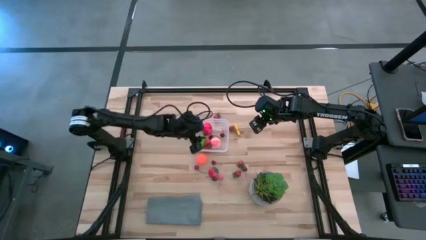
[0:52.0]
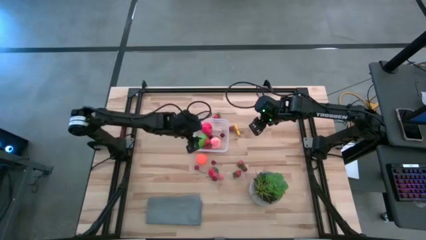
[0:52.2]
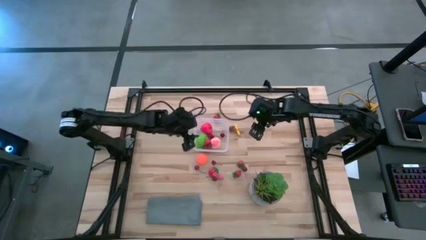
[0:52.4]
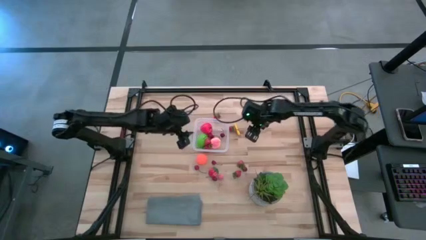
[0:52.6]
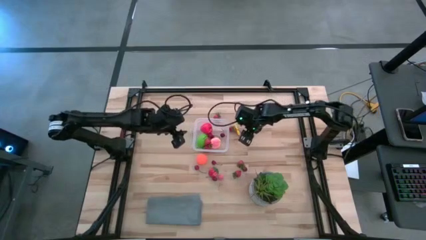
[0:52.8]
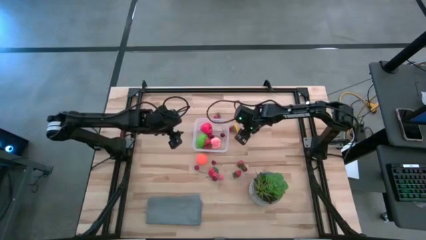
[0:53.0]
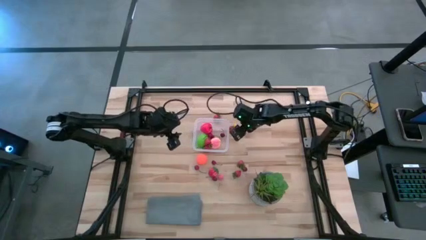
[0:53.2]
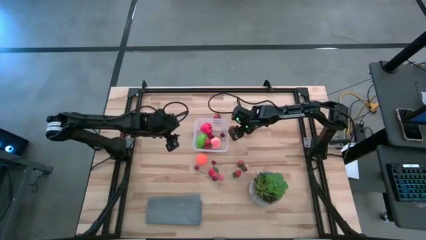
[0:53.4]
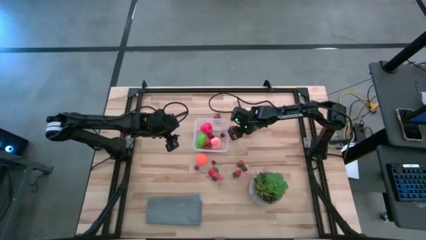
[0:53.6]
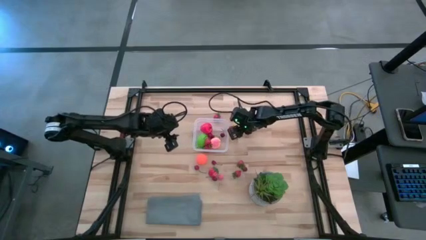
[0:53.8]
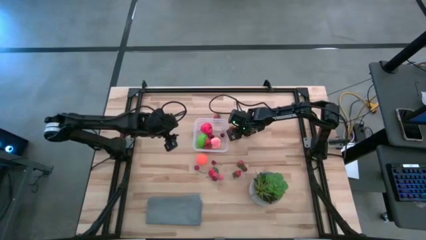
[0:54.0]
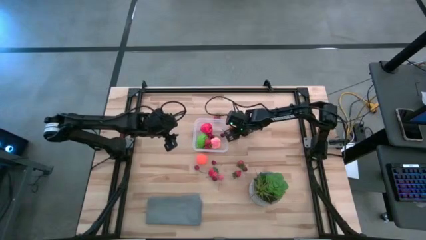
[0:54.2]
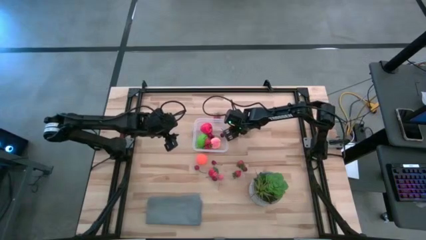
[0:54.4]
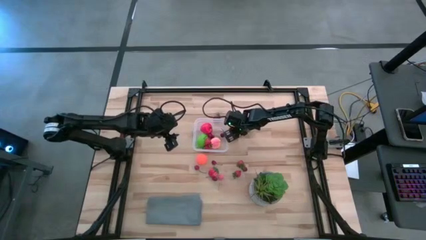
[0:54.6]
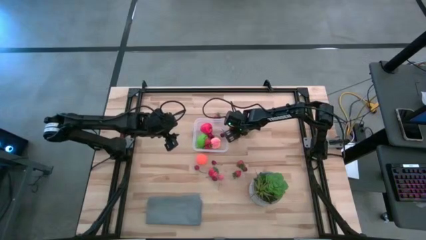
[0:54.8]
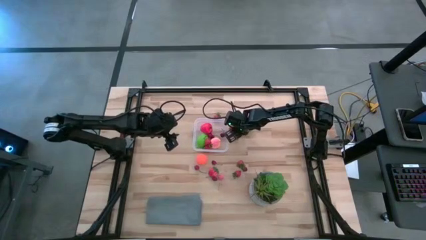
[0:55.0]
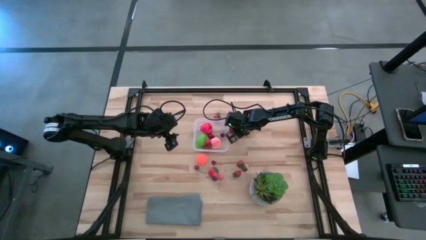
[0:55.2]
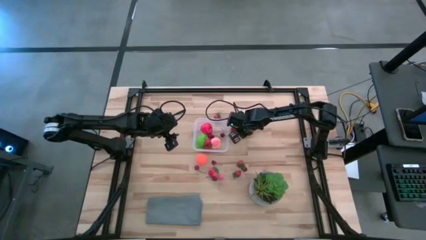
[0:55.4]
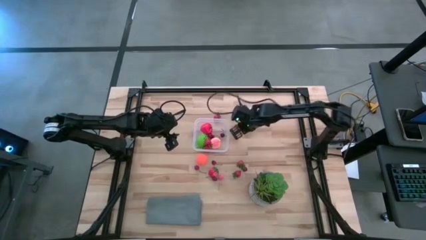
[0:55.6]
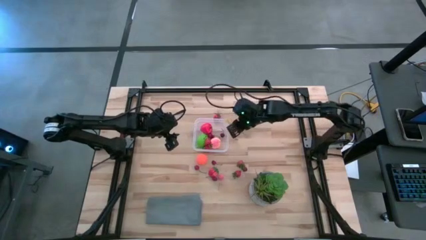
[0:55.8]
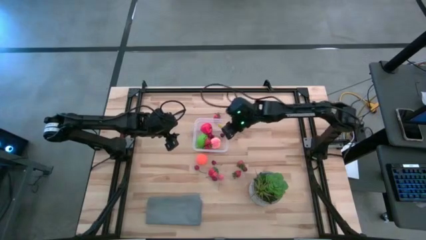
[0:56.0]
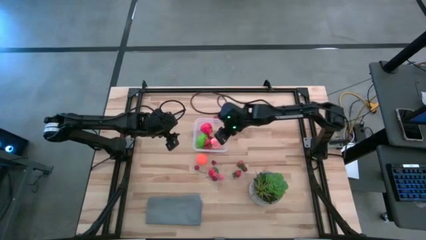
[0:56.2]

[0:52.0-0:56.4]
Task: Pick and placing Produce into tupperware
Put the yellow corn into the transparent bin

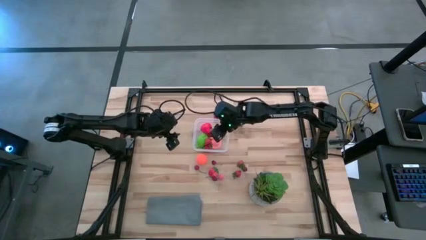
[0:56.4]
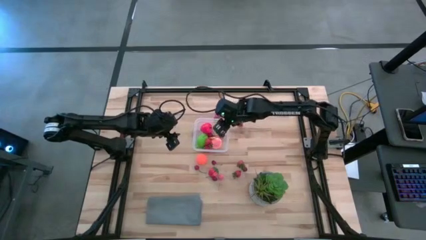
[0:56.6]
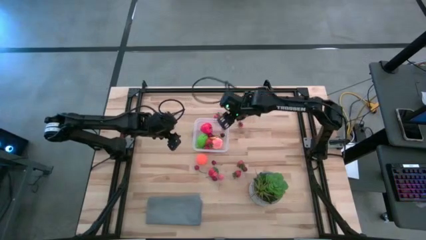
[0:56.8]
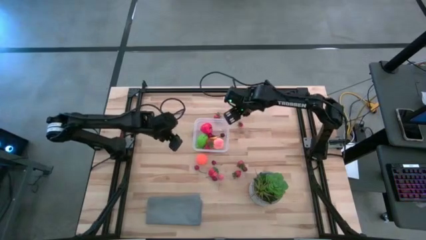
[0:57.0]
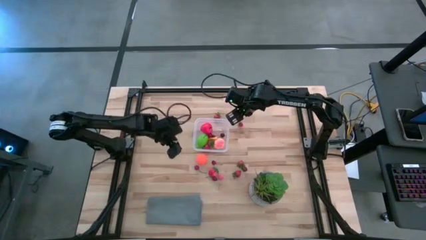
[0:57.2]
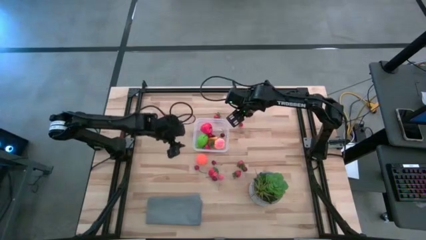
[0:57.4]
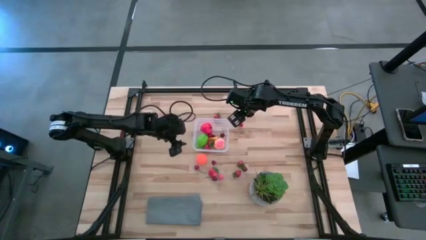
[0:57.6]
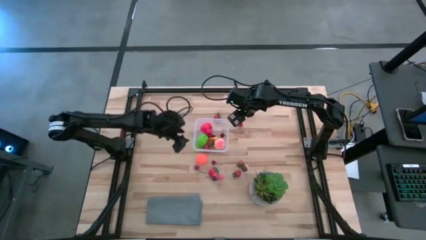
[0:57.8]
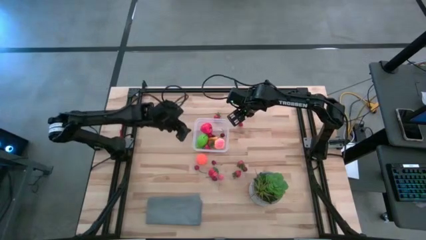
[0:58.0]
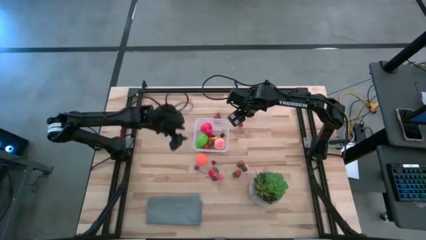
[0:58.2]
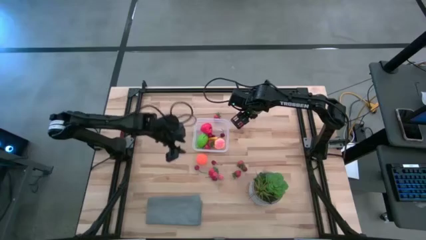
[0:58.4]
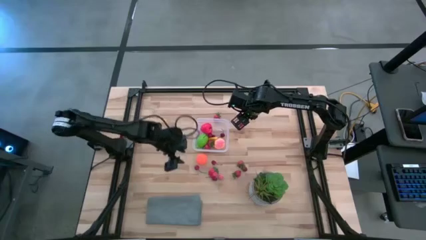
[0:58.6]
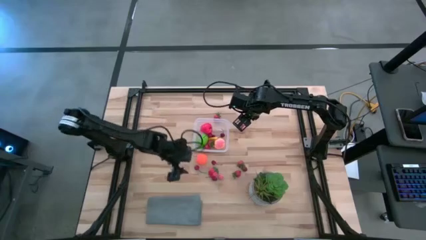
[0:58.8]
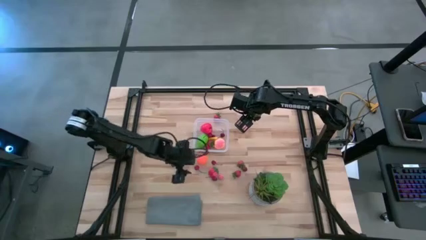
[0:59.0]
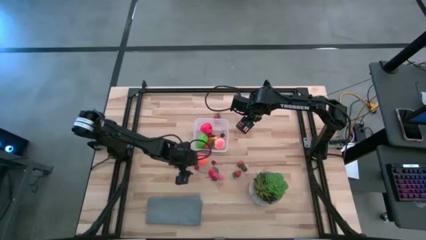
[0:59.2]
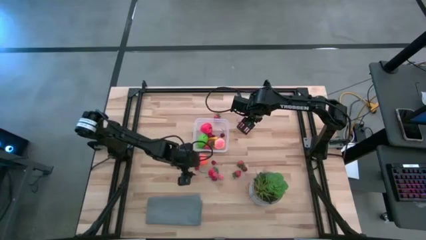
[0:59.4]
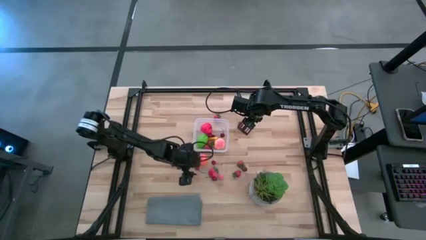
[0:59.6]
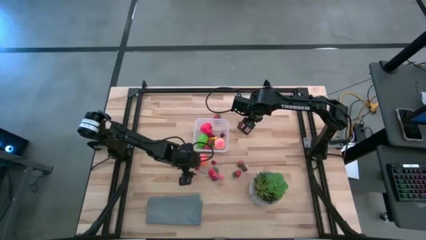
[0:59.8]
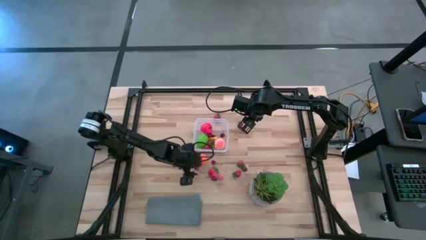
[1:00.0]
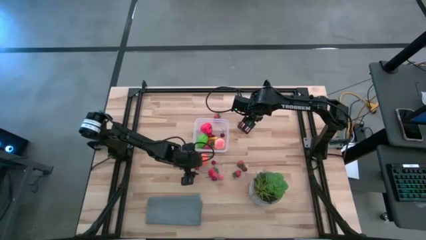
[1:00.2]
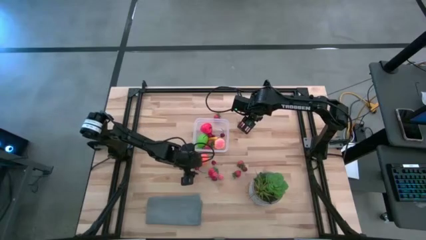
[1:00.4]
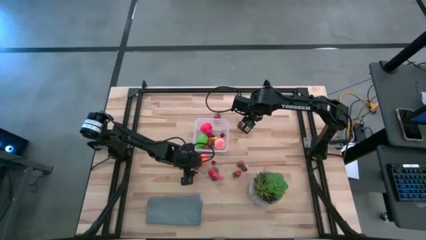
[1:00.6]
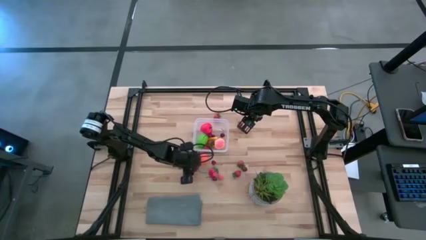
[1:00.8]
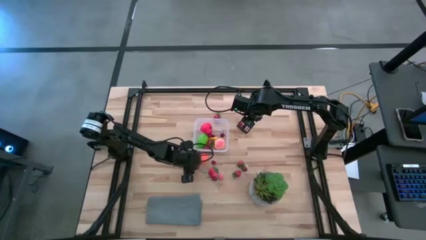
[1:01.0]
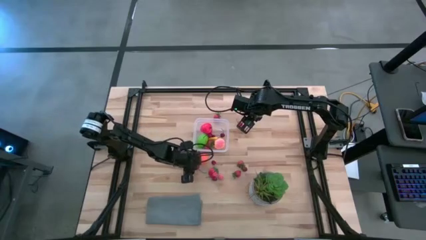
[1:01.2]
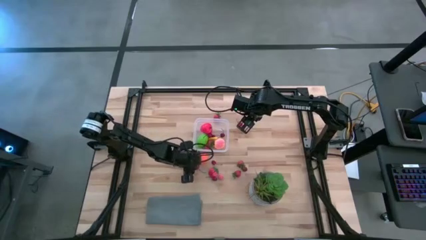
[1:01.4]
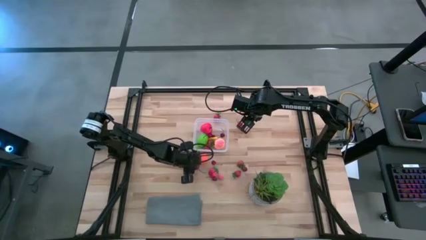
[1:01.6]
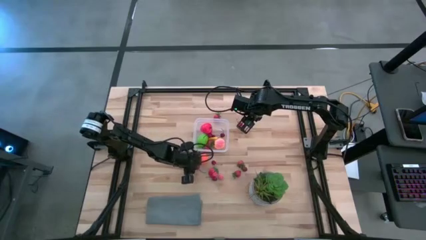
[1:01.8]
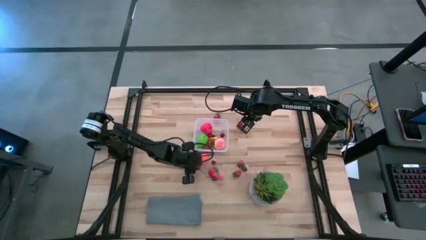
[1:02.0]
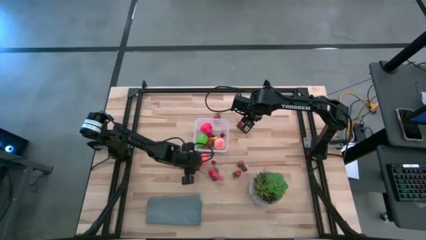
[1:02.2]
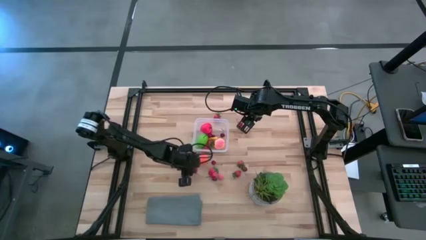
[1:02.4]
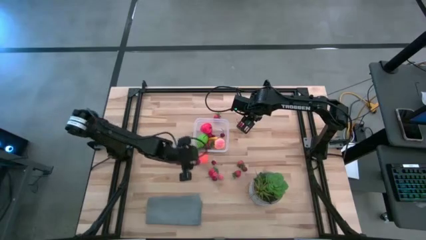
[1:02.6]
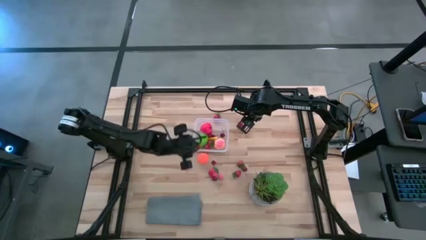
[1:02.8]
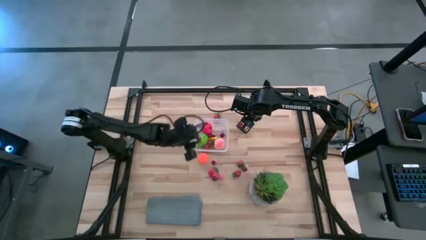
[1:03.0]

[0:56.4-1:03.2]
Put the red cherry into the transparent bin

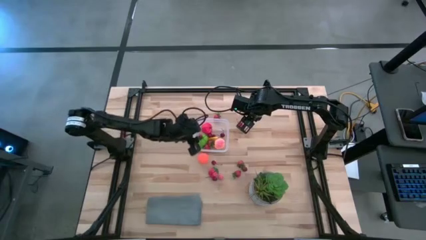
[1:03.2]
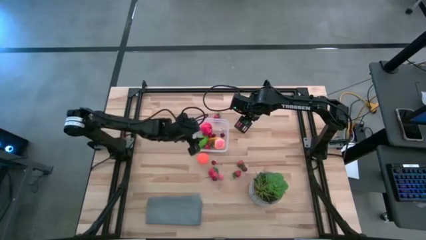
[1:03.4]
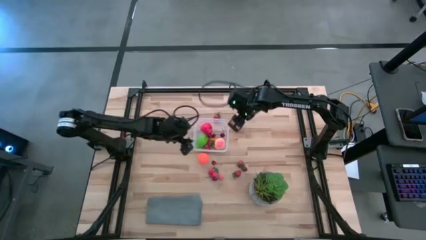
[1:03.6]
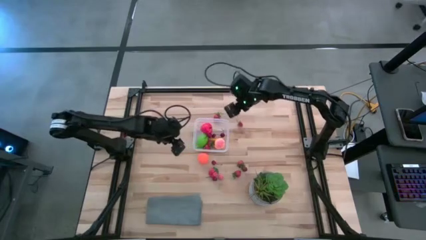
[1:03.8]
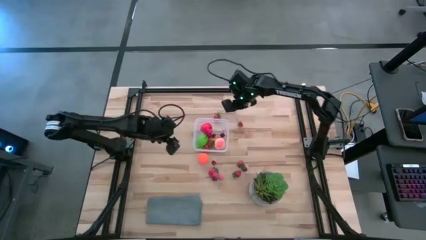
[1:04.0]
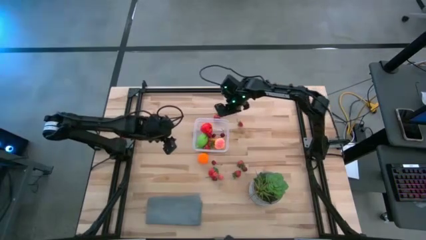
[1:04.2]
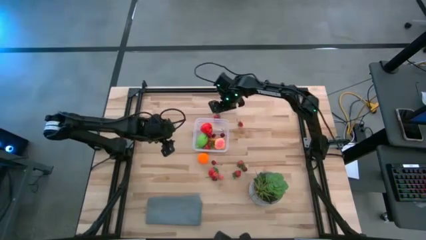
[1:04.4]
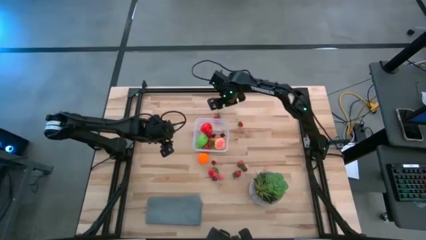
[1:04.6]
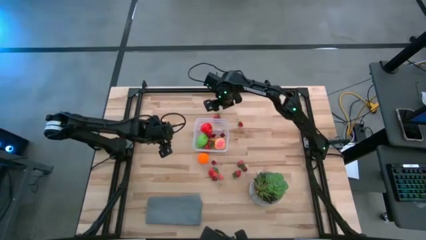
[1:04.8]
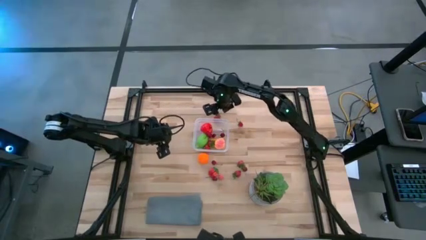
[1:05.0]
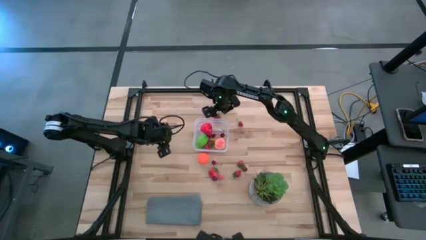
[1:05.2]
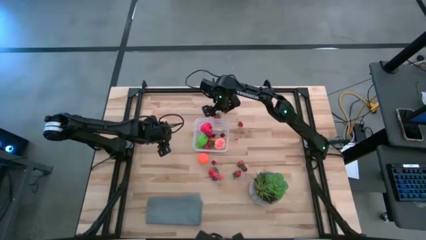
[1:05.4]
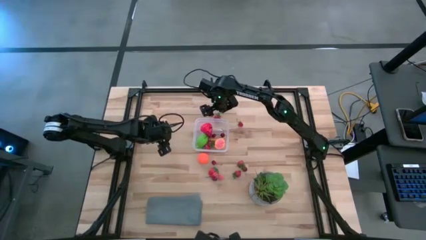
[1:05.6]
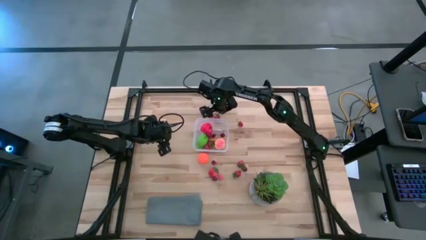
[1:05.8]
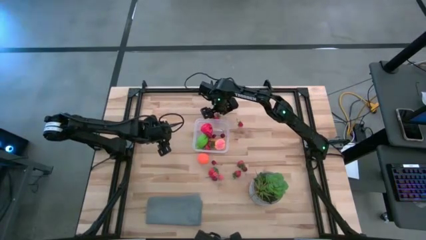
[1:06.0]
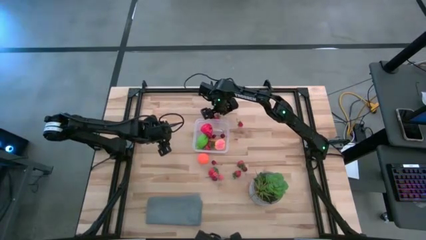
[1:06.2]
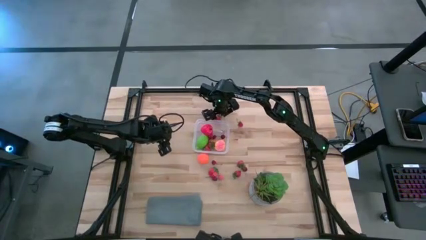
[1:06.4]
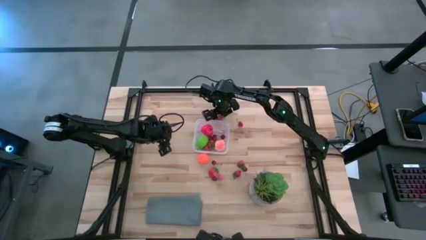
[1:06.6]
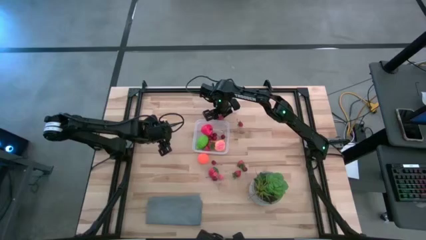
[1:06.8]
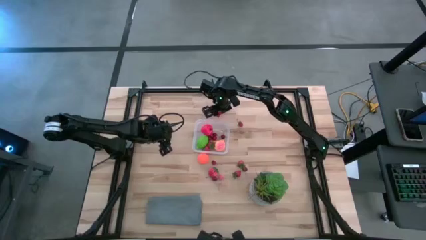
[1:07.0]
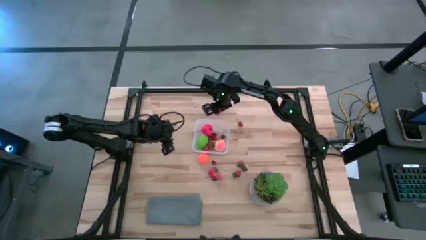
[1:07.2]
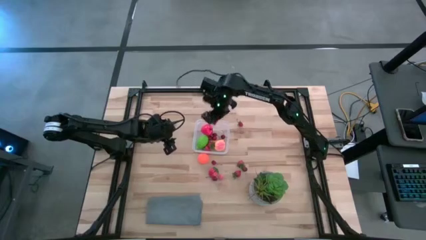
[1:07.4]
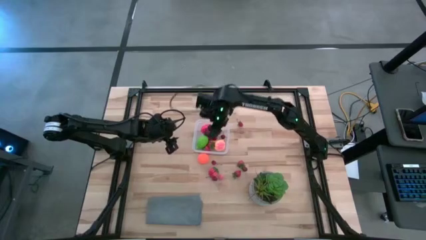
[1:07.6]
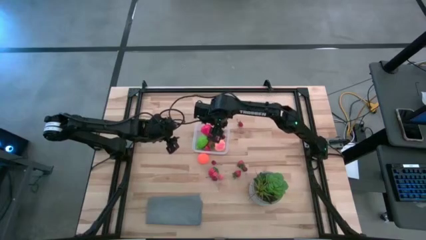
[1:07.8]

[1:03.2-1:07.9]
Put the red strawberry into the transparent bin

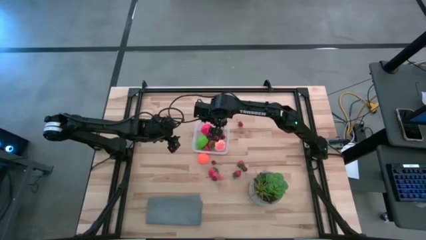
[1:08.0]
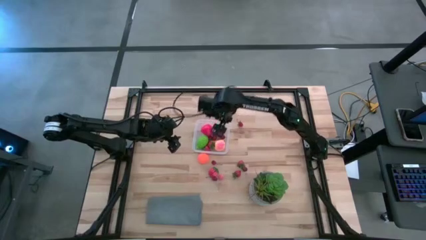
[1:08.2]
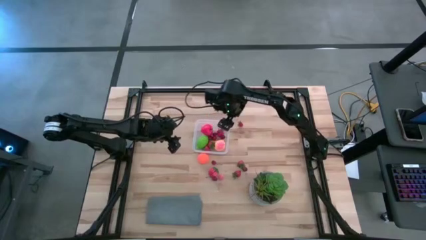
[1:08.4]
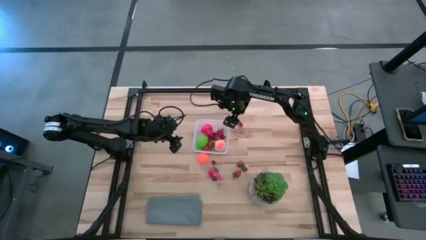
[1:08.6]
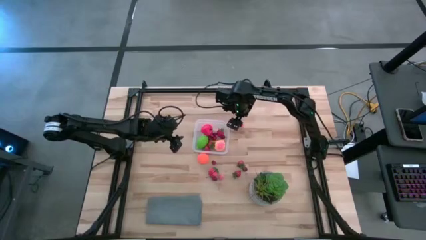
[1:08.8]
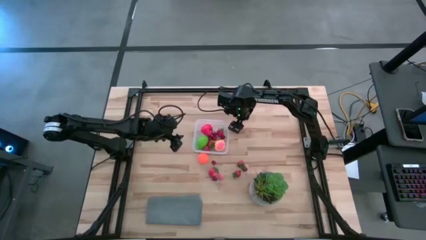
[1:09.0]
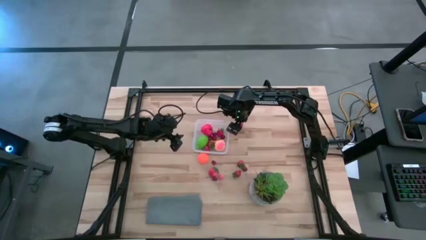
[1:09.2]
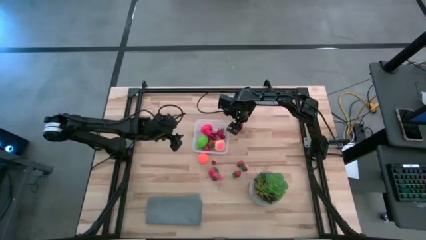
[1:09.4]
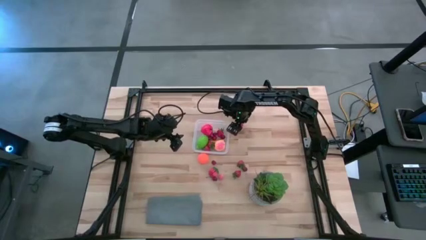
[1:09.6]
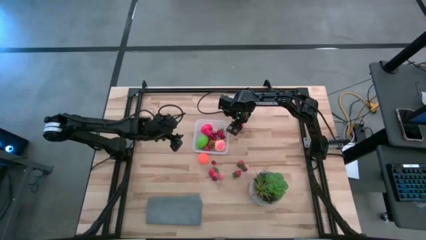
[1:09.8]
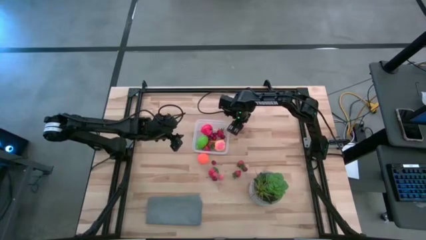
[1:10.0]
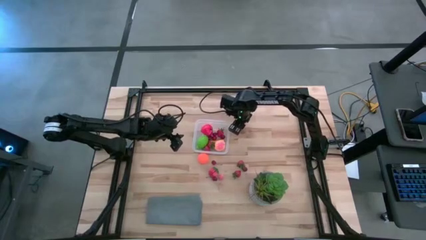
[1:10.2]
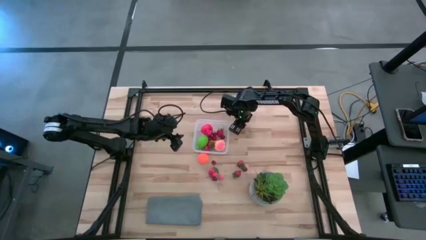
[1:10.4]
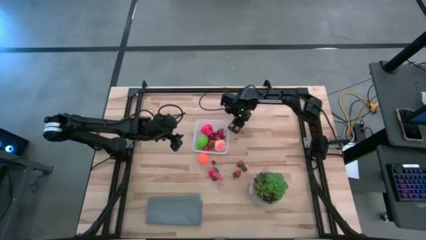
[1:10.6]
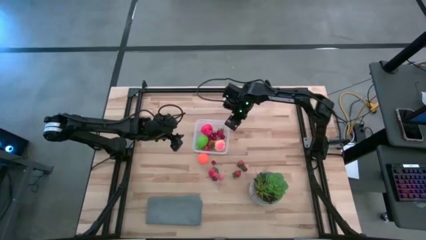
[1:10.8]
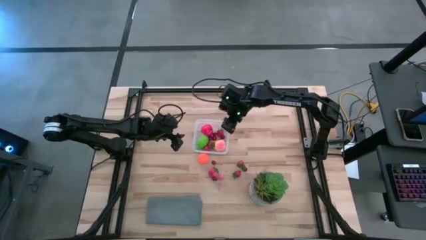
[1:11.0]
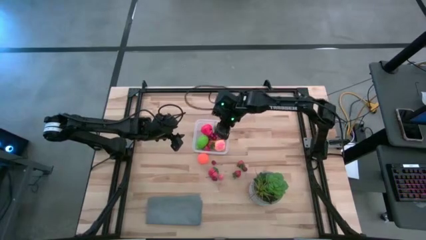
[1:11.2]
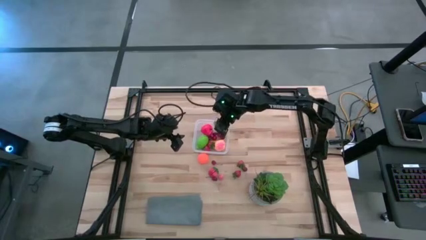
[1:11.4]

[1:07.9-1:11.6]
Put the red strawberry into the transparent bin
